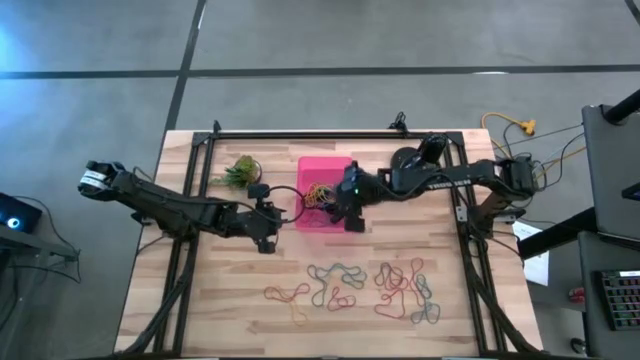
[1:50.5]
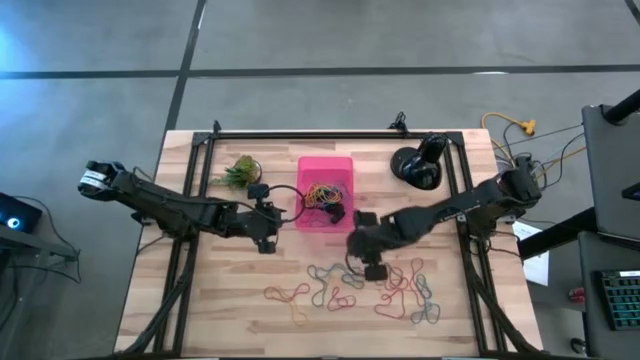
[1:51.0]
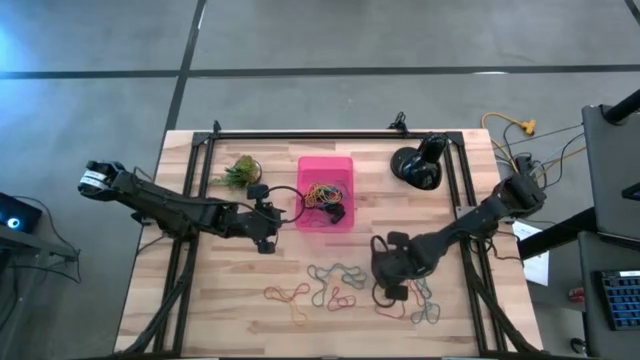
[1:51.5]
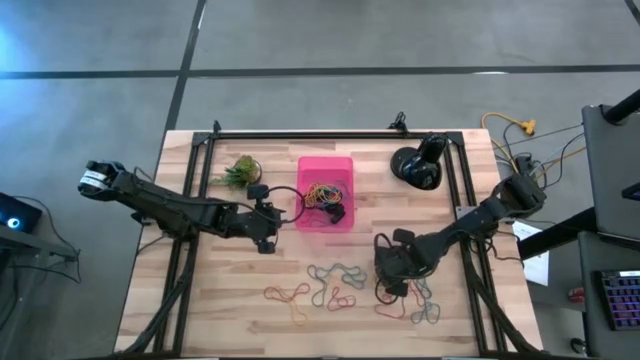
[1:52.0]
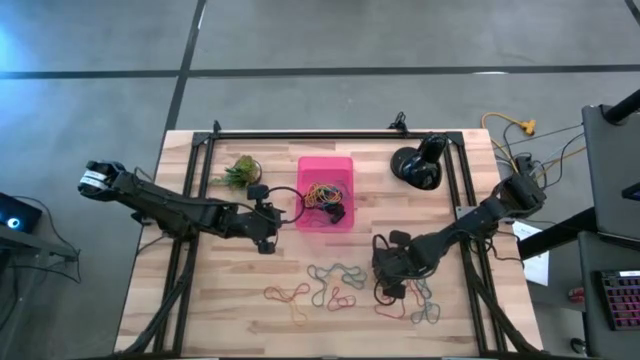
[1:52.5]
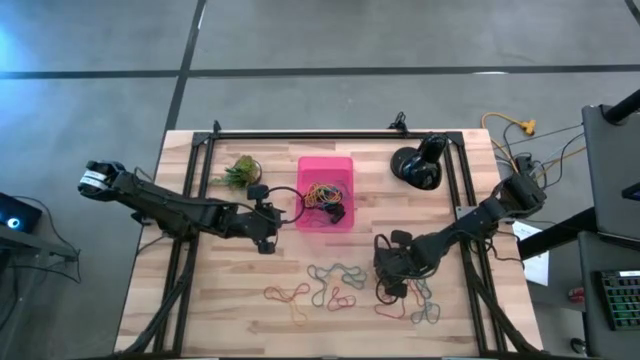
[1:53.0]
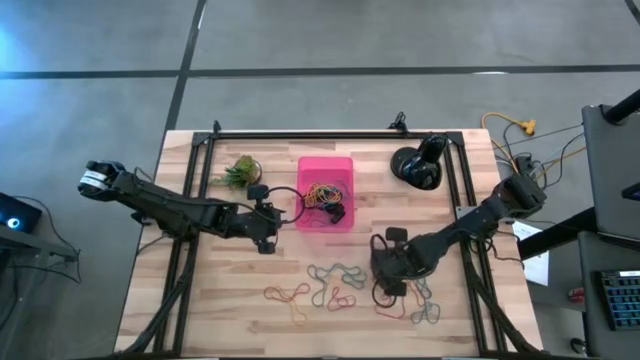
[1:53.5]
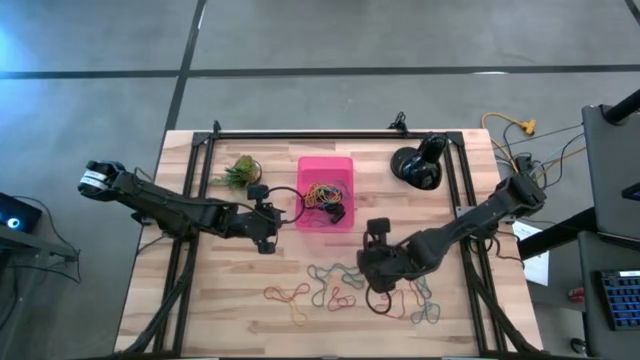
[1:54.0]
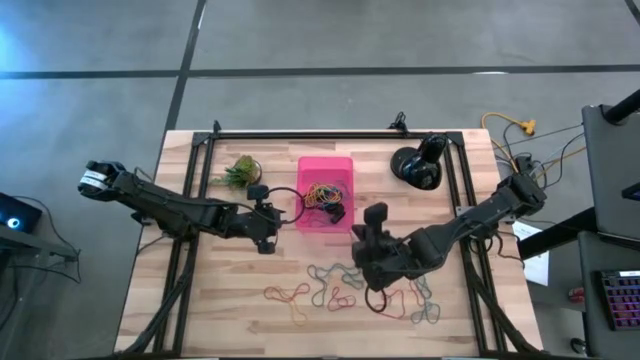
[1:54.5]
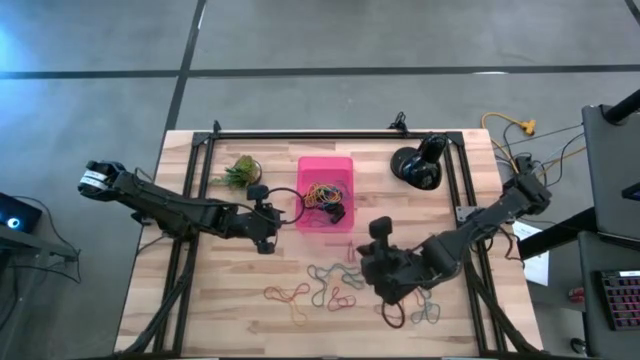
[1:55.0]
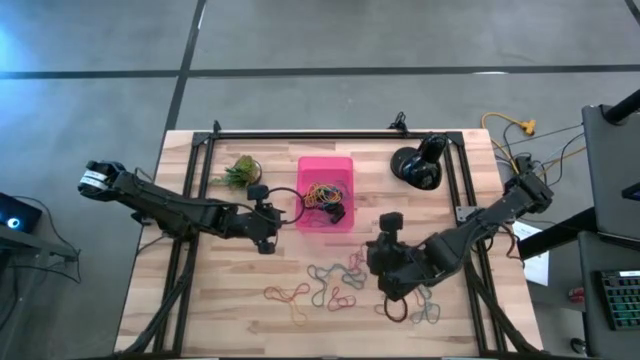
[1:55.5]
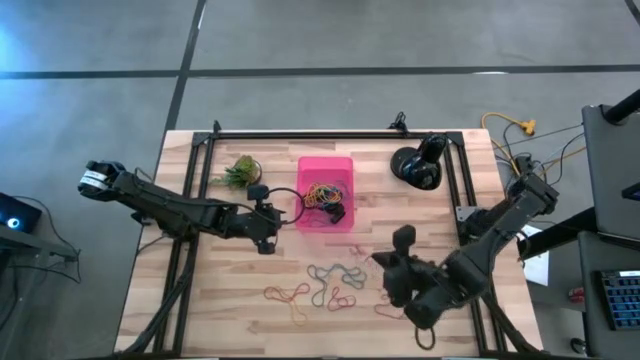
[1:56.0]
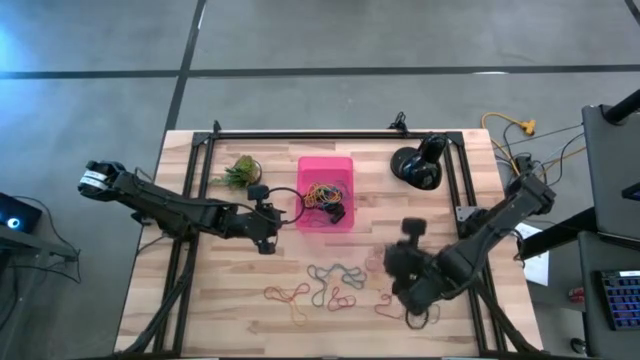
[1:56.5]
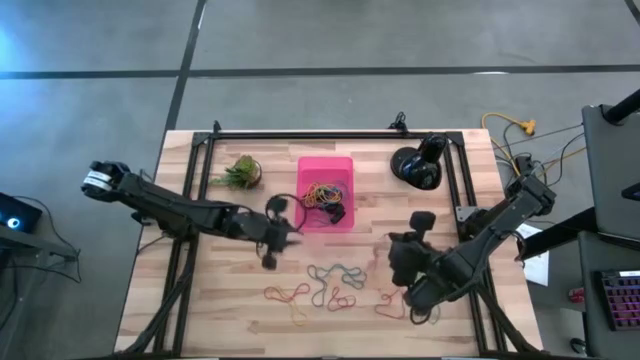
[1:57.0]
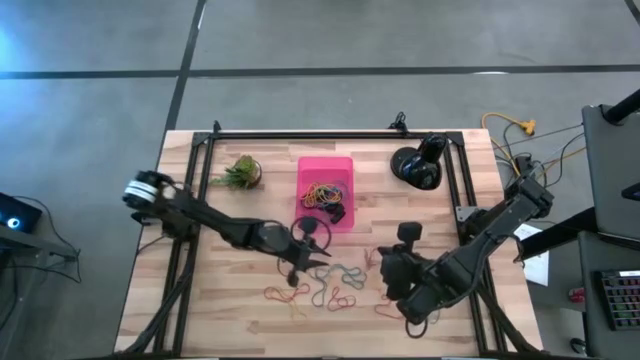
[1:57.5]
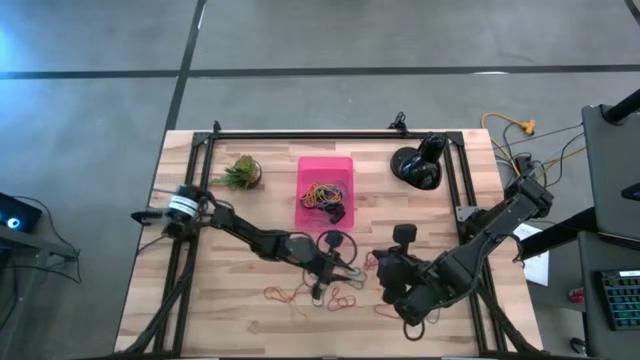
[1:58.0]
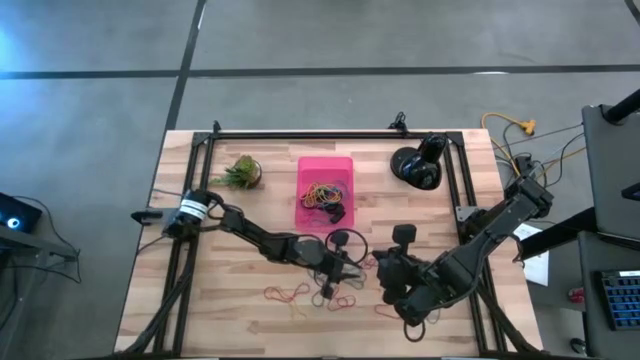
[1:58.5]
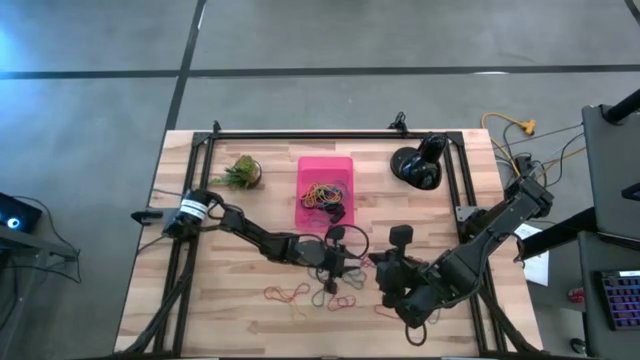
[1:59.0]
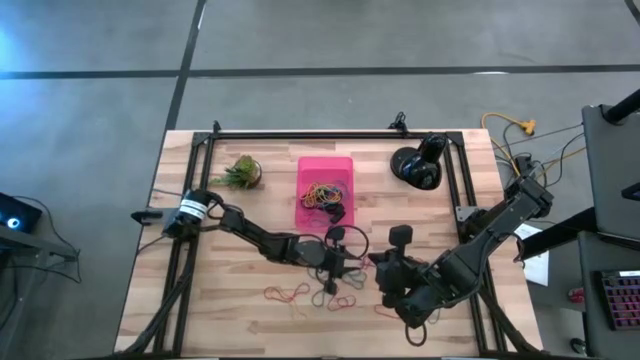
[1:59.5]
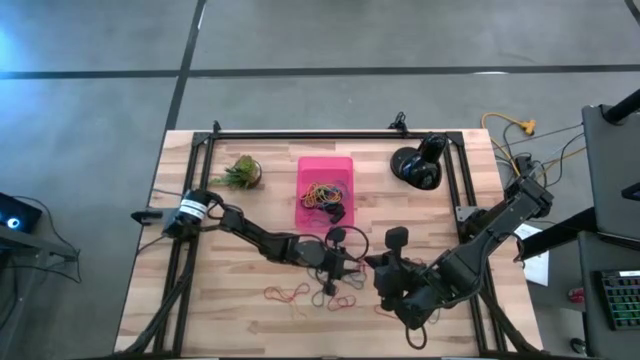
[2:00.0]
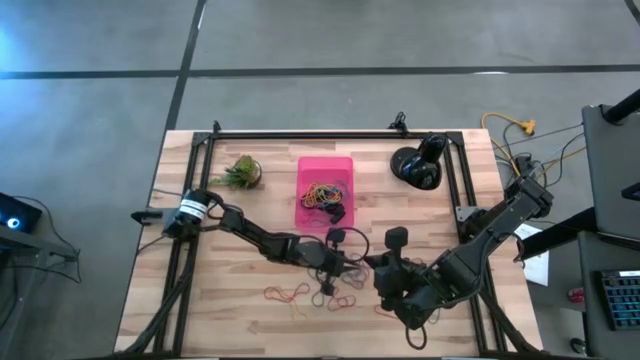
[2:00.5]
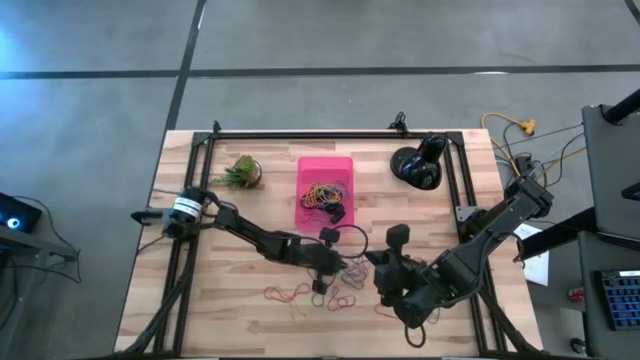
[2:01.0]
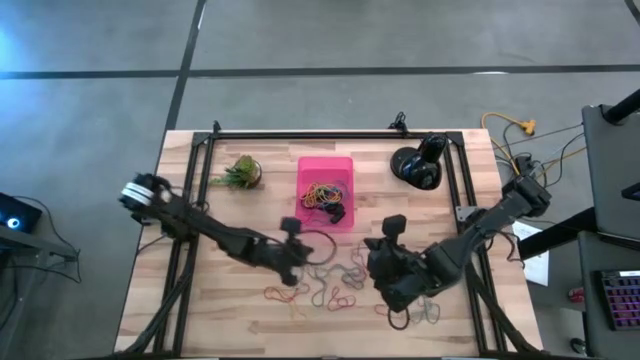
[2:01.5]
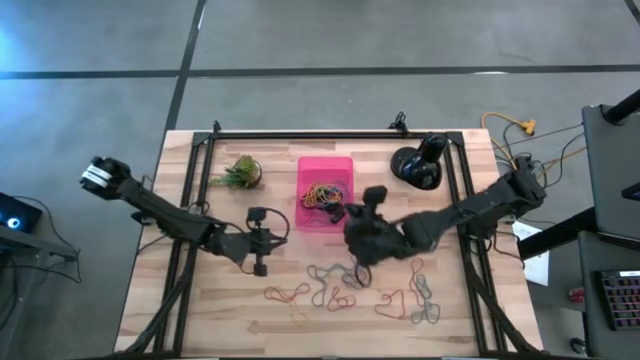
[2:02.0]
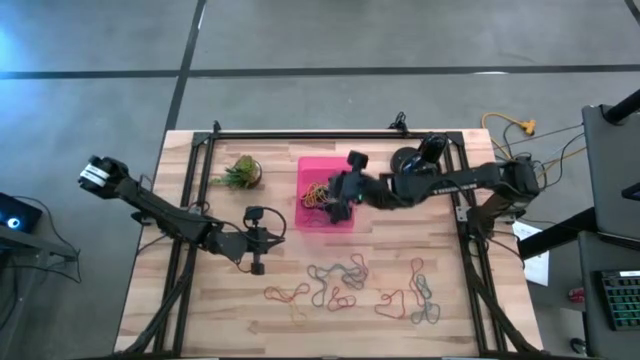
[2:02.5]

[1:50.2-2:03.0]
Task: Pick and place rubber bands into bin
Put the purple rubber bands into the pink bin

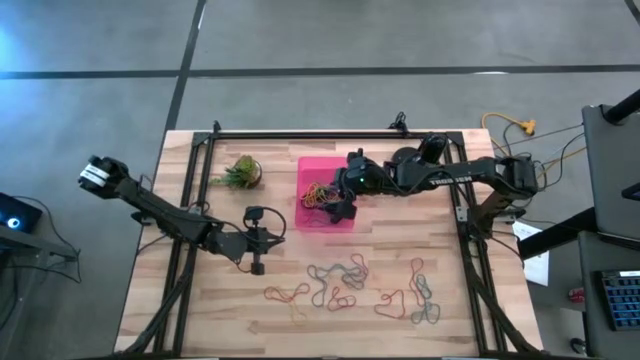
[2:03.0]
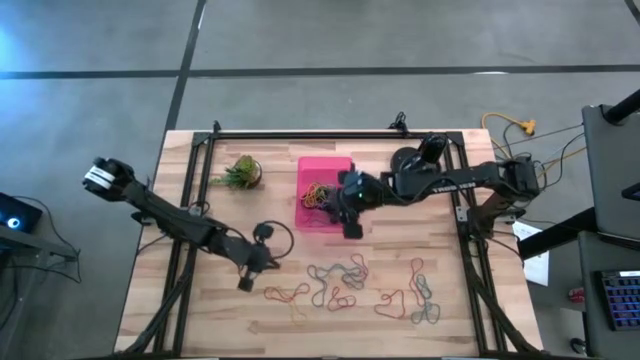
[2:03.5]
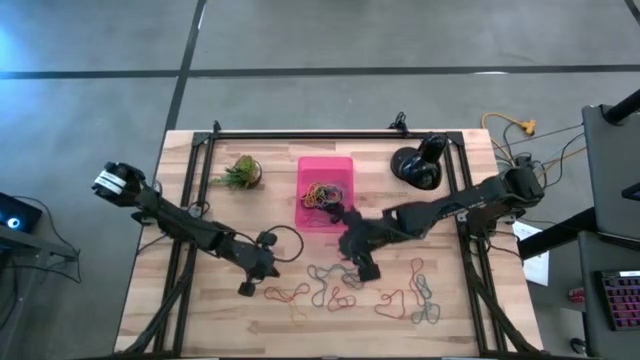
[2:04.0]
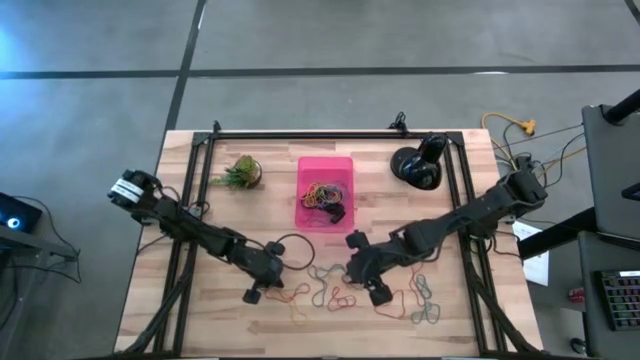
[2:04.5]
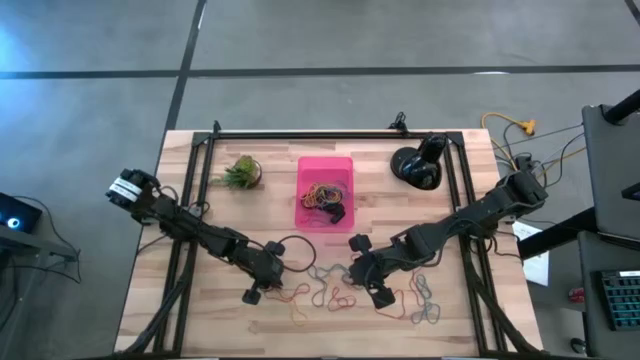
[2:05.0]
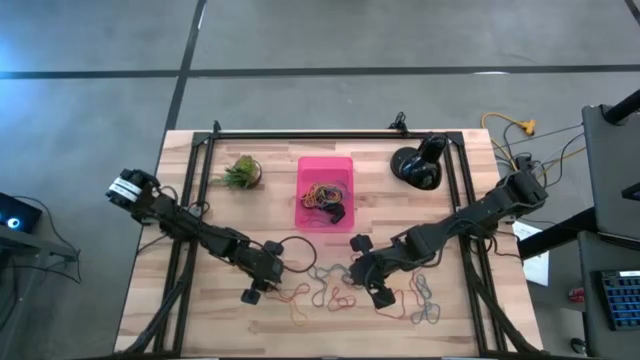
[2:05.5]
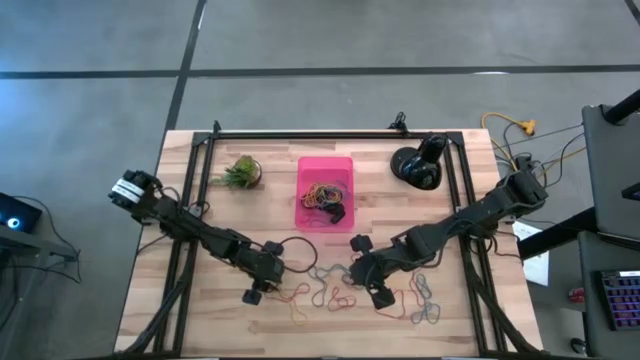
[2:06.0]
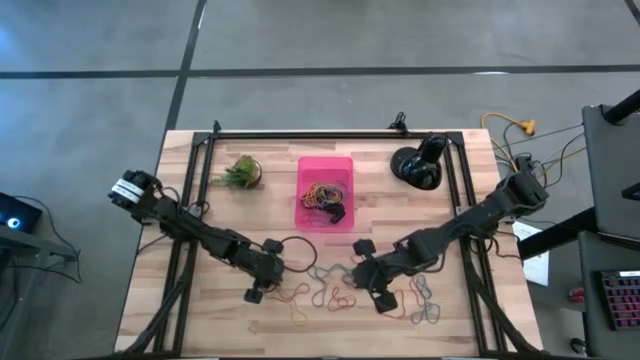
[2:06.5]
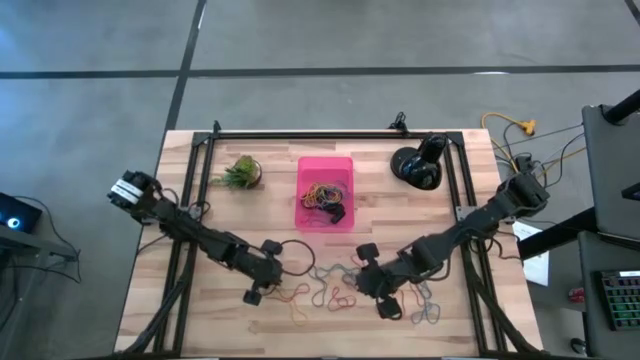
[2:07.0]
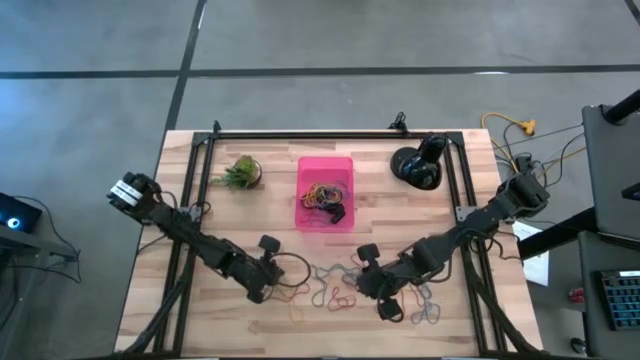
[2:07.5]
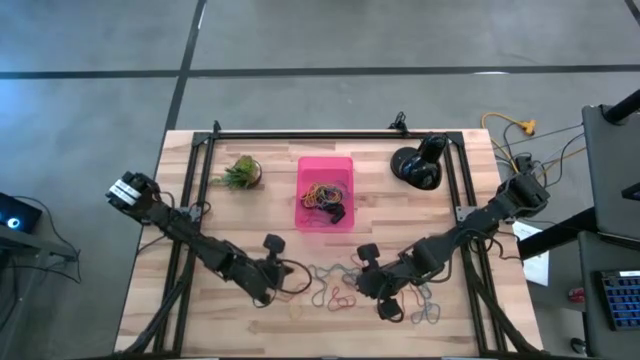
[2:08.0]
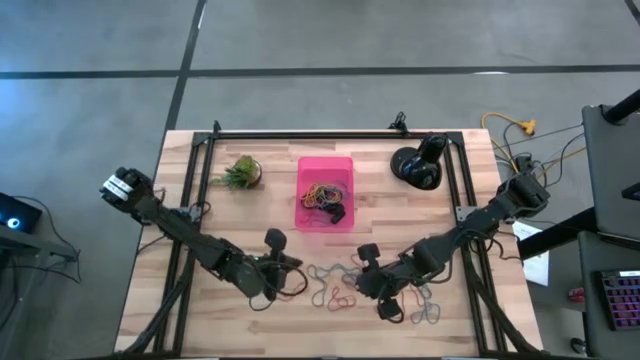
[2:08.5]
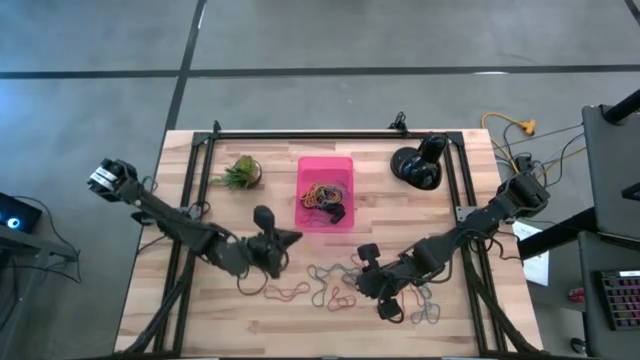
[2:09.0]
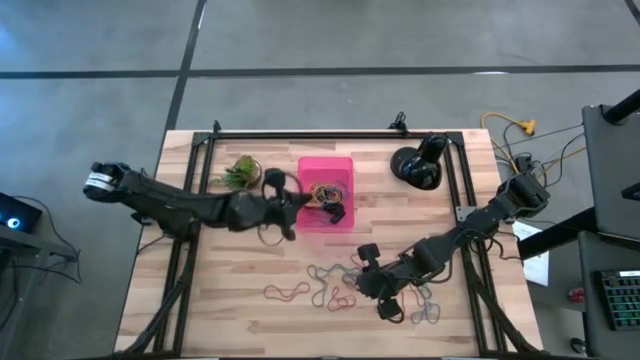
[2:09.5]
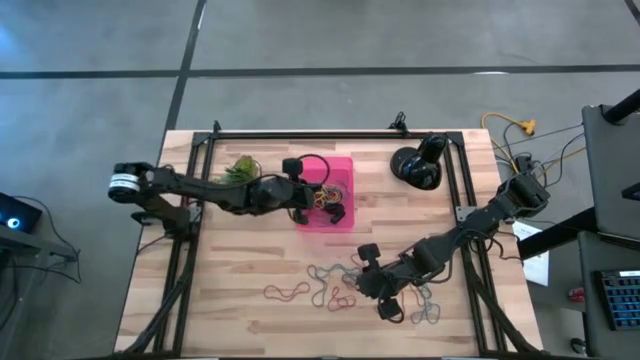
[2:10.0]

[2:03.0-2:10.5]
Put the yellow rubber bands into the pink bin
